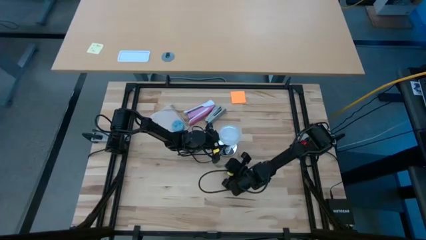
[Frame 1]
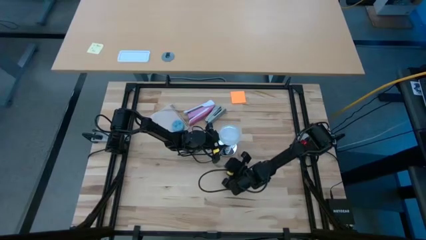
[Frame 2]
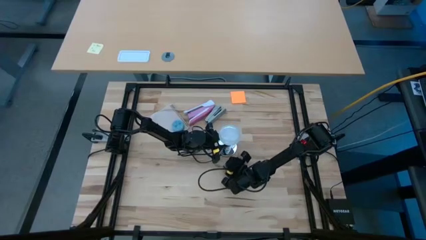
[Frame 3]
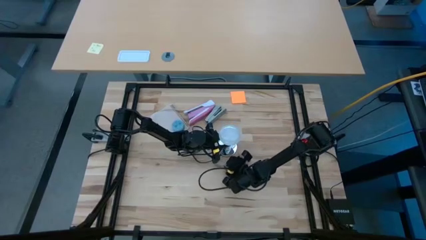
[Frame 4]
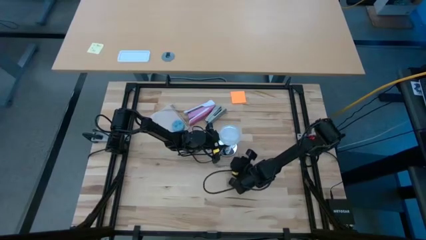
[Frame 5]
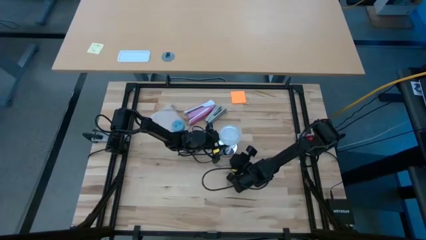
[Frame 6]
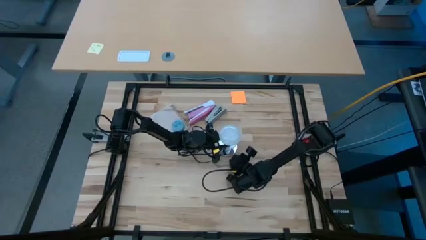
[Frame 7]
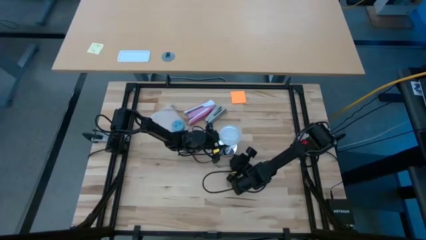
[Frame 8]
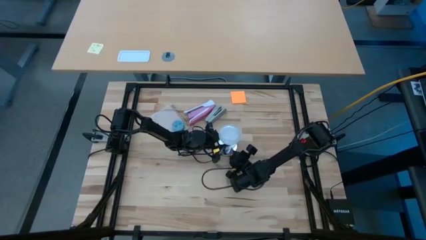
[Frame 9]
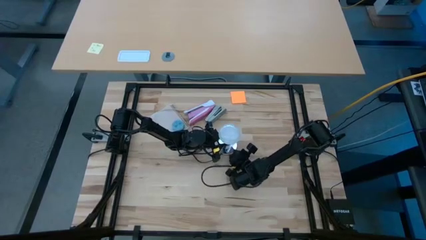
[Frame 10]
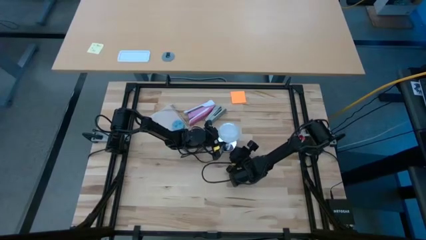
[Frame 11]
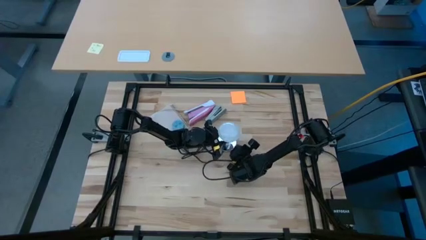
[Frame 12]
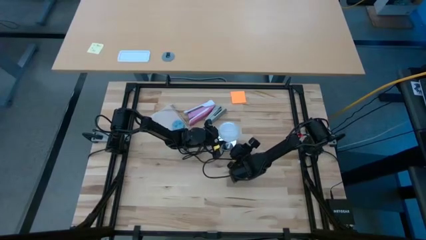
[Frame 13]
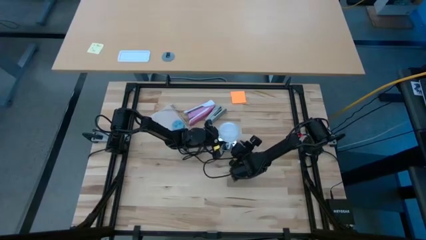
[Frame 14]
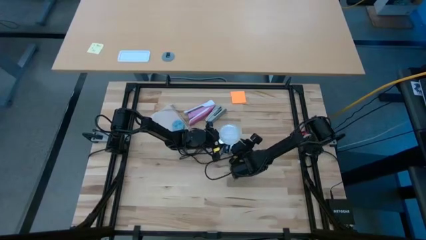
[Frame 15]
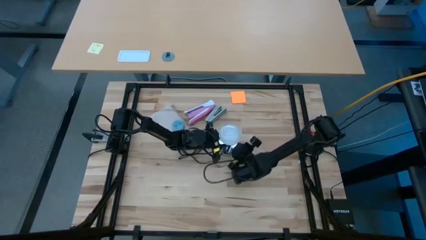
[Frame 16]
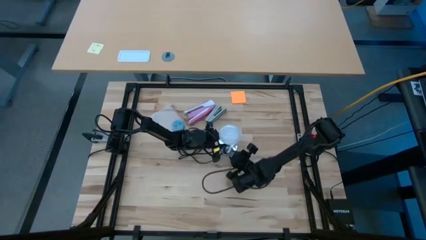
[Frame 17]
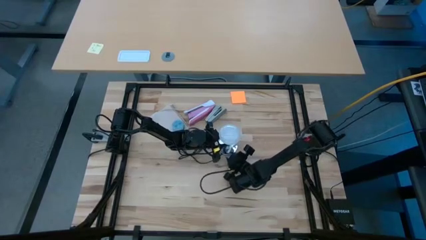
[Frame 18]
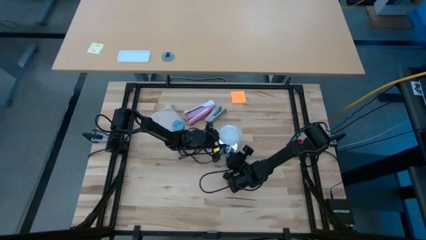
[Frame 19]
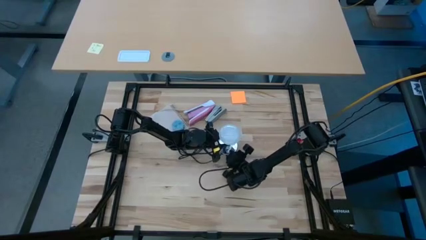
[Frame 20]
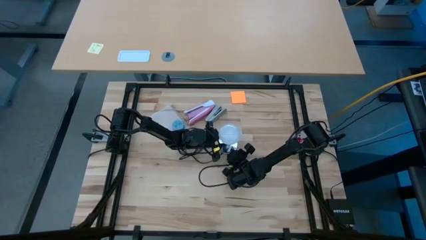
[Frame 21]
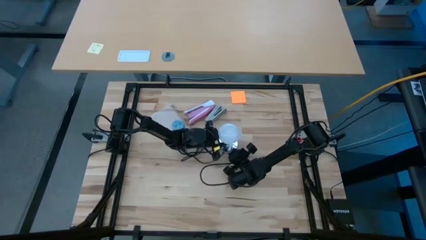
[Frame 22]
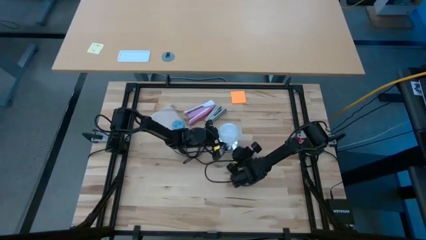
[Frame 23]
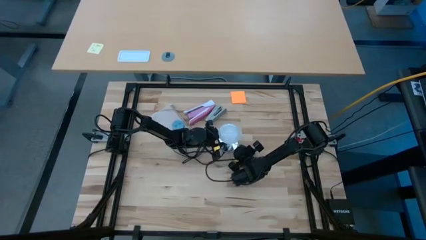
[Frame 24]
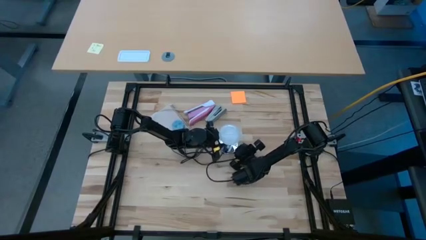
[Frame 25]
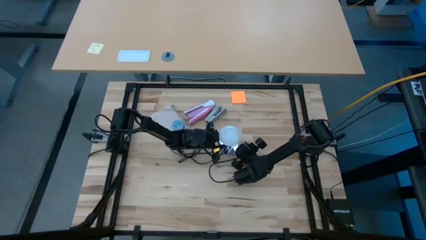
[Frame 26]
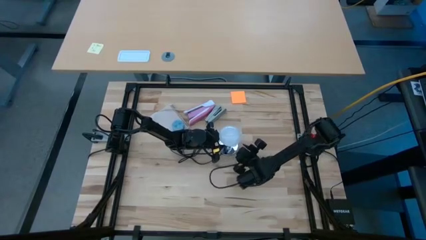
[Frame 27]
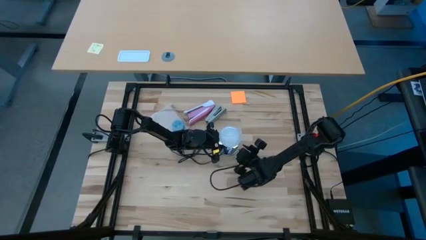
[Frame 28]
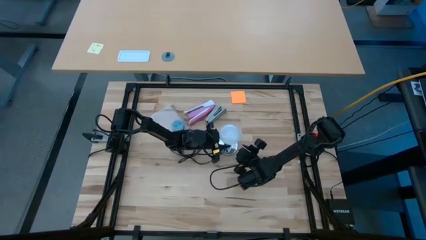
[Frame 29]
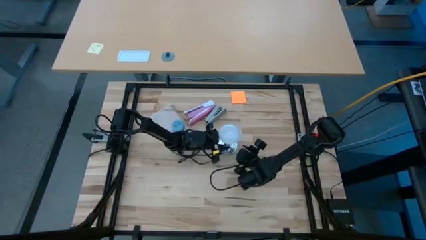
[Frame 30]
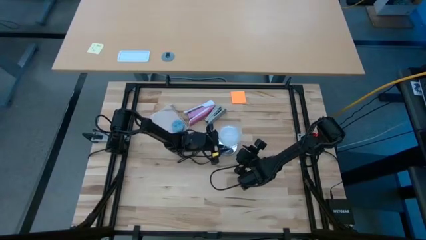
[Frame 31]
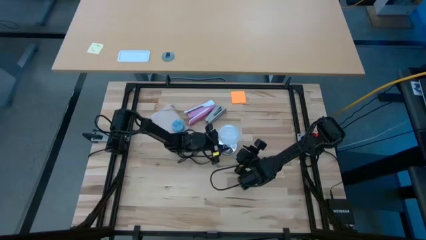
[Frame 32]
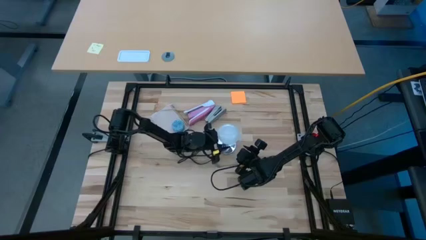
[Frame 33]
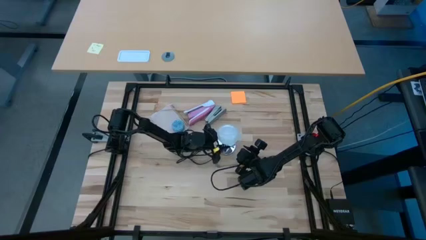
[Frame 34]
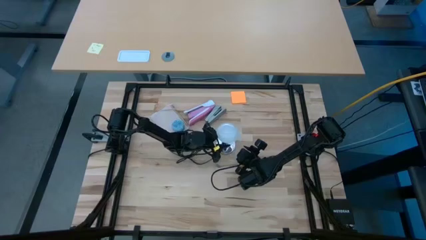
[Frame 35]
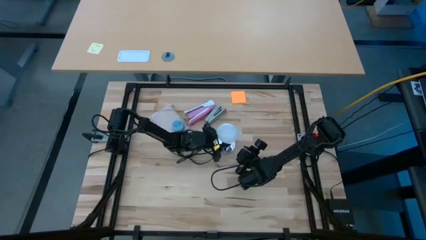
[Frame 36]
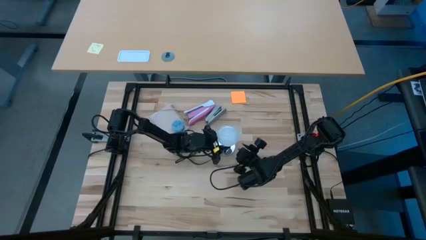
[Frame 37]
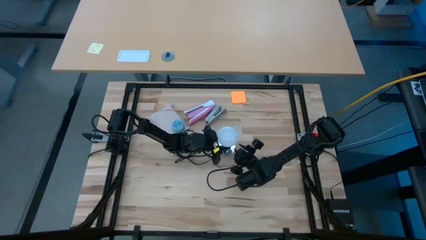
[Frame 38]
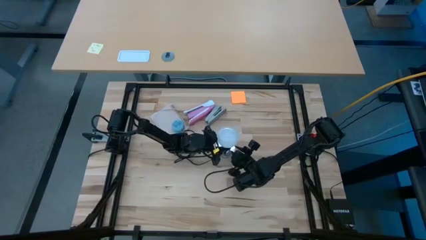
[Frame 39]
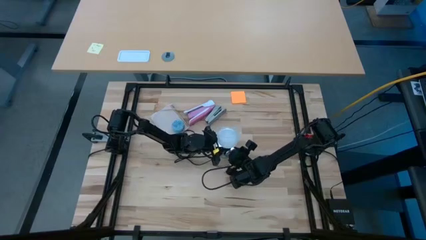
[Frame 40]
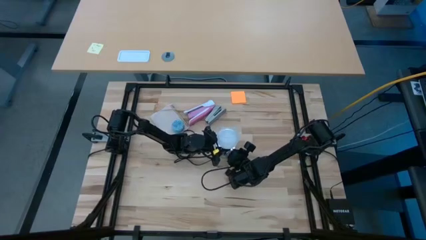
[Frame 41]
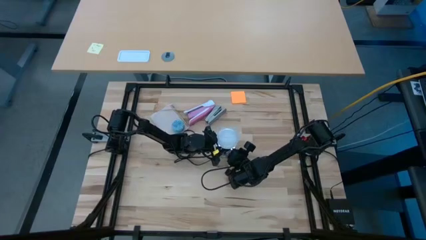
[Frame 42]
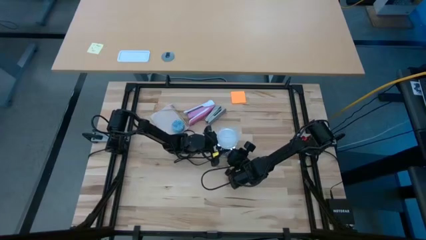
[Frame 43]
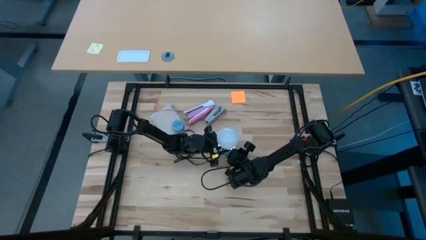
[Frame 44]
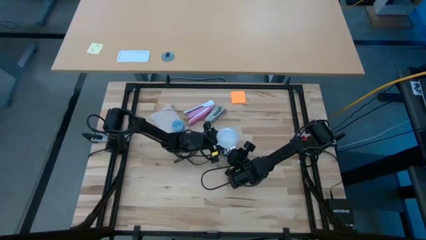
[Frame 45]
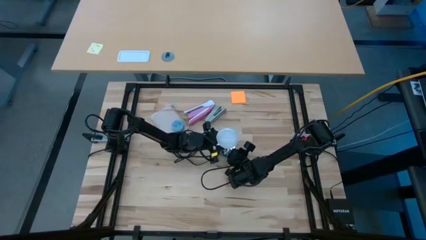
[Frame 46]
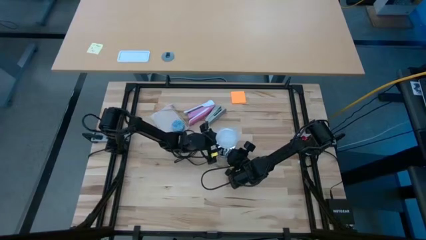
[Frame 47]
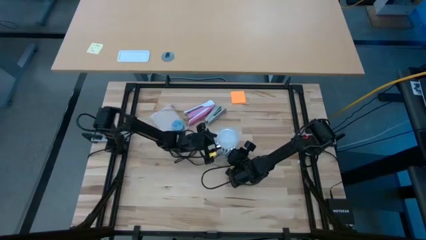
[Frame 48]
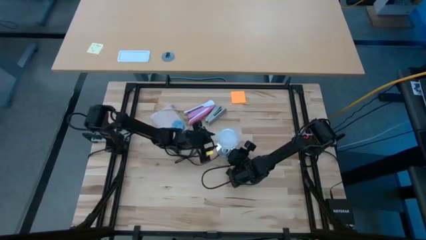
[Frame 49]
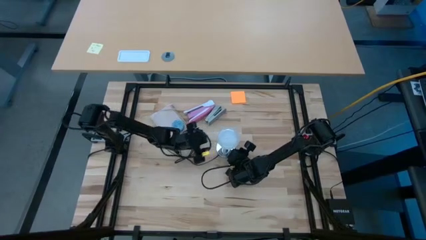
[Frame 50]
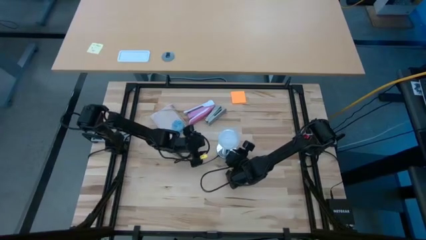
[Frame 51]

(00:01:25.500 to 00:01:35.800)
Task: Screw lightbulb
Insert the white lightbulb into the silver desk lamp

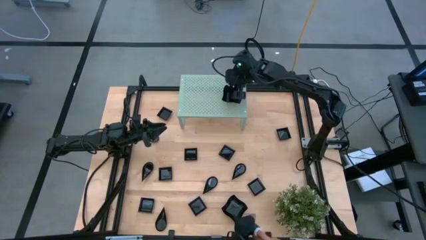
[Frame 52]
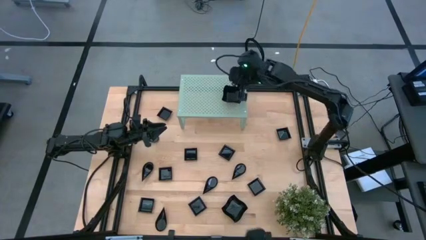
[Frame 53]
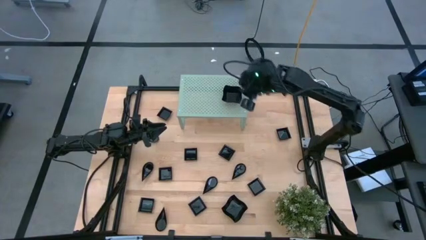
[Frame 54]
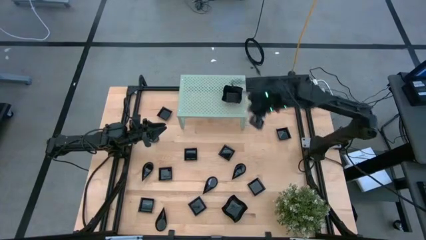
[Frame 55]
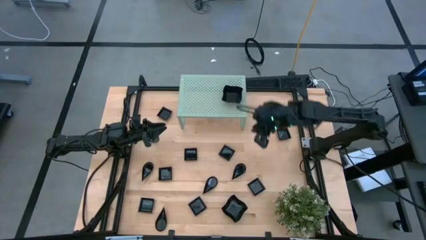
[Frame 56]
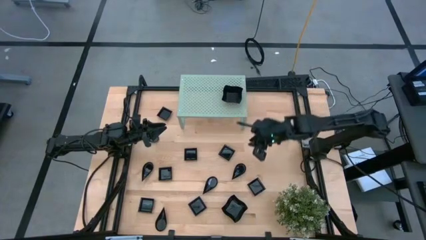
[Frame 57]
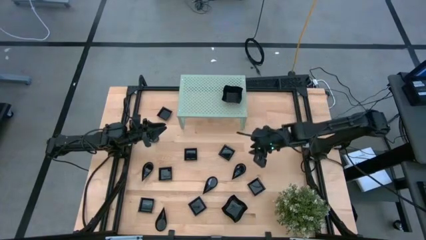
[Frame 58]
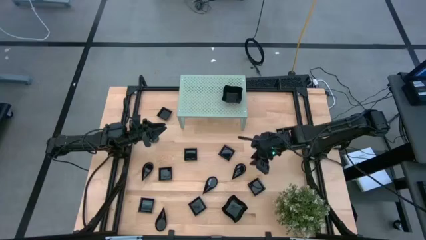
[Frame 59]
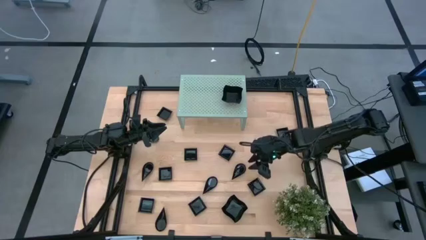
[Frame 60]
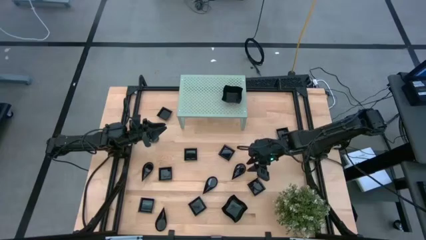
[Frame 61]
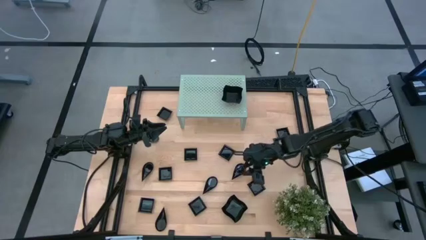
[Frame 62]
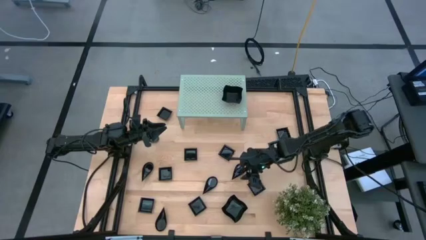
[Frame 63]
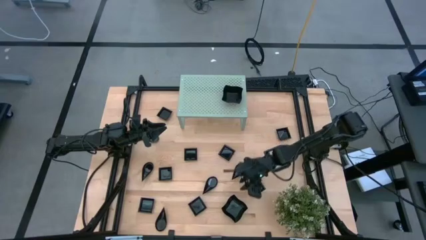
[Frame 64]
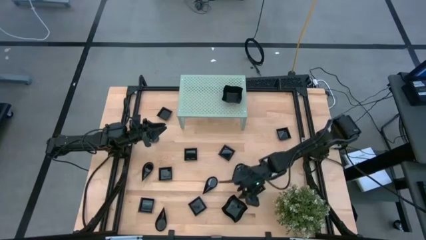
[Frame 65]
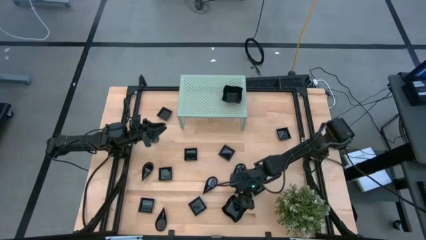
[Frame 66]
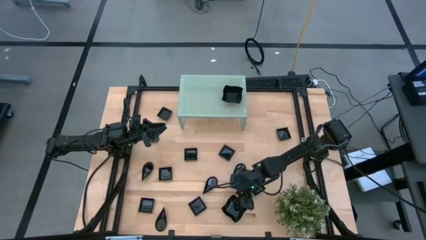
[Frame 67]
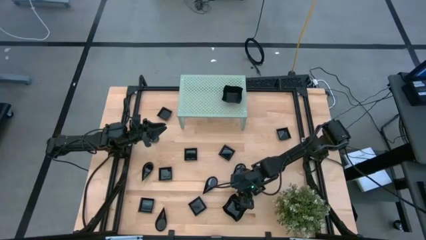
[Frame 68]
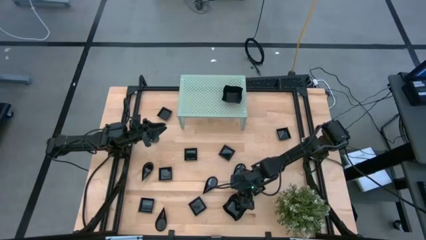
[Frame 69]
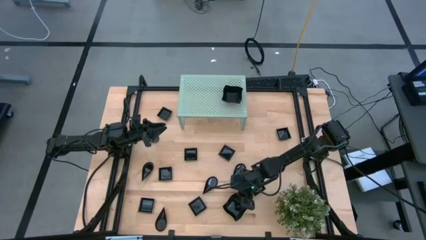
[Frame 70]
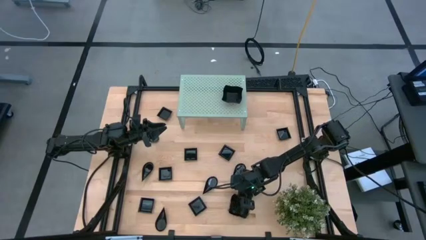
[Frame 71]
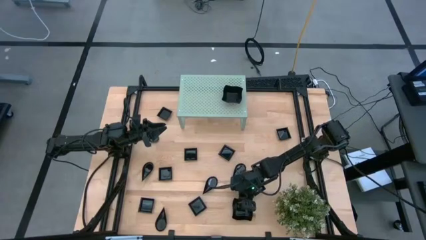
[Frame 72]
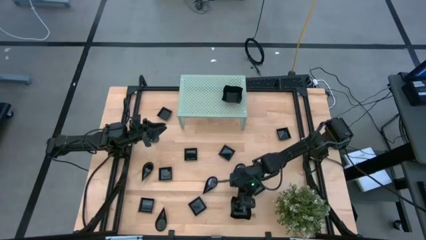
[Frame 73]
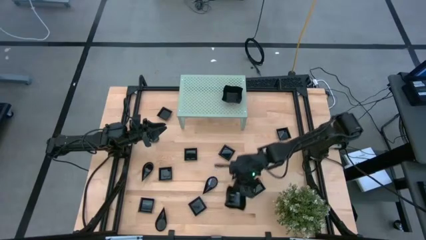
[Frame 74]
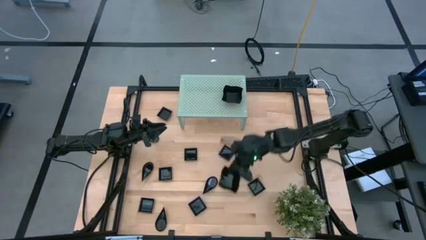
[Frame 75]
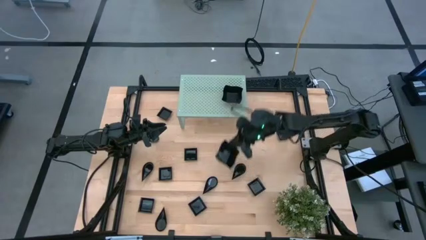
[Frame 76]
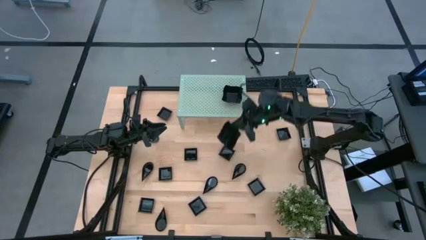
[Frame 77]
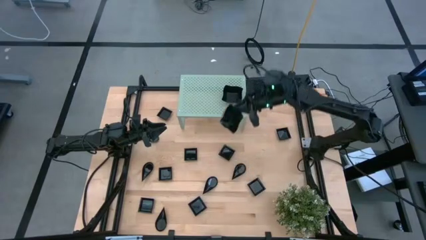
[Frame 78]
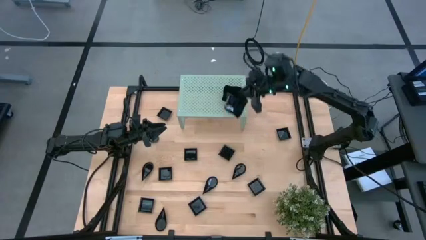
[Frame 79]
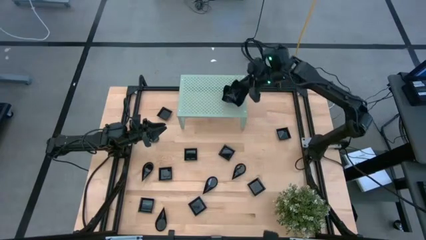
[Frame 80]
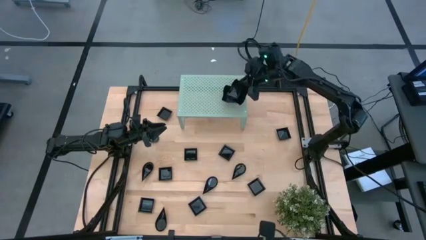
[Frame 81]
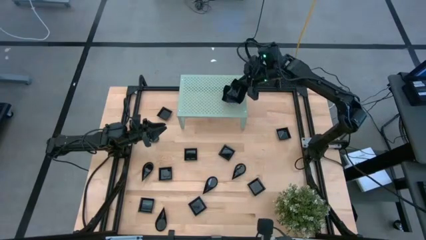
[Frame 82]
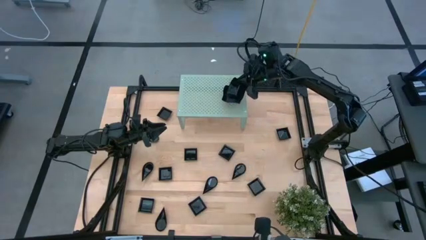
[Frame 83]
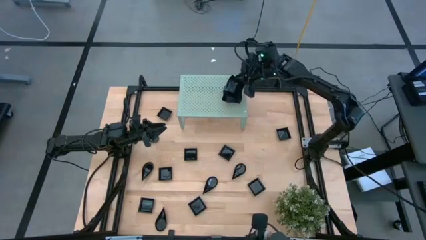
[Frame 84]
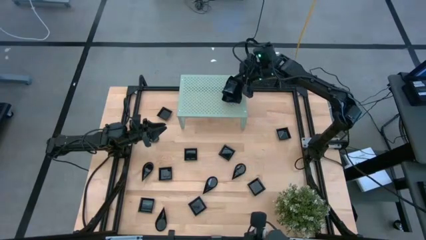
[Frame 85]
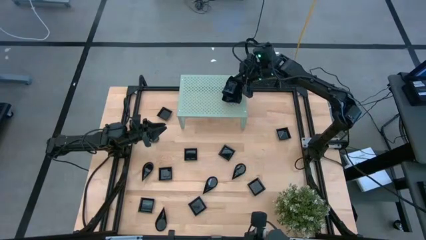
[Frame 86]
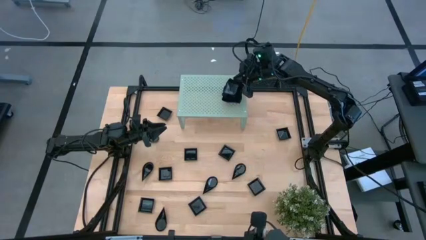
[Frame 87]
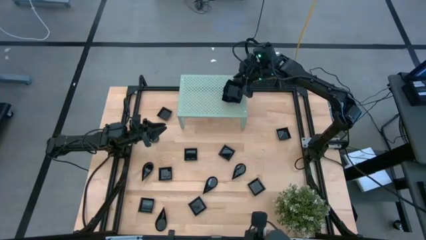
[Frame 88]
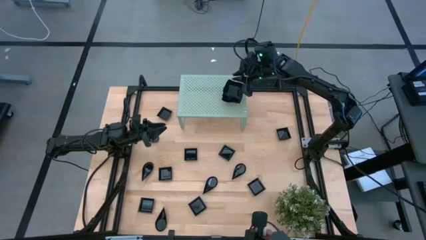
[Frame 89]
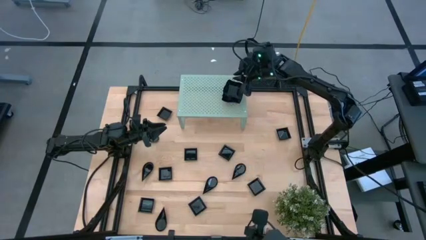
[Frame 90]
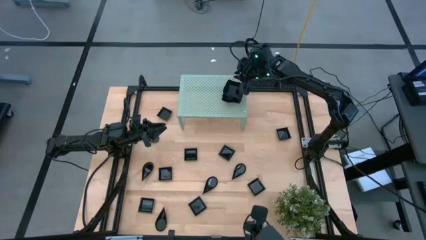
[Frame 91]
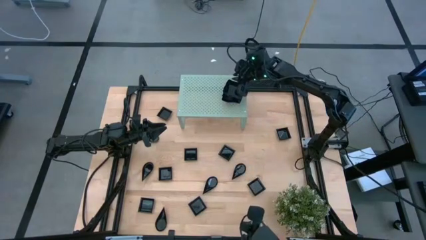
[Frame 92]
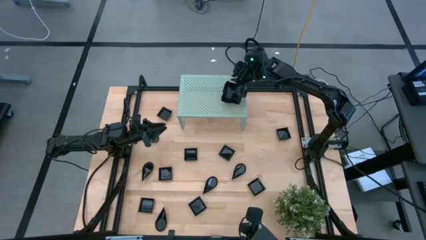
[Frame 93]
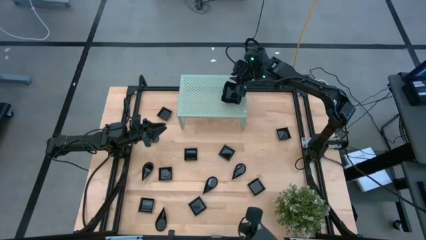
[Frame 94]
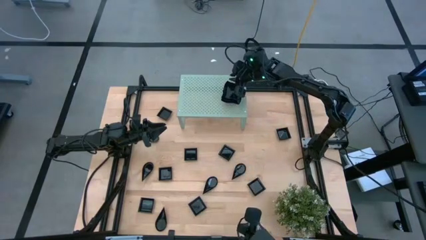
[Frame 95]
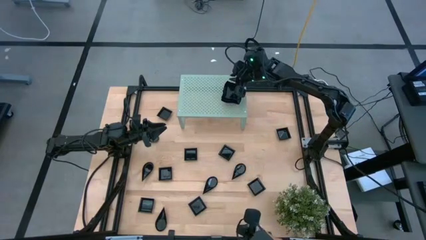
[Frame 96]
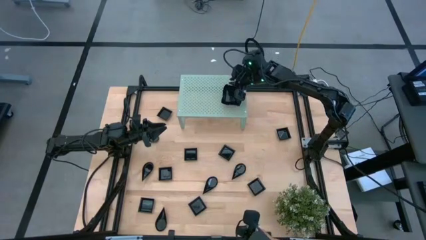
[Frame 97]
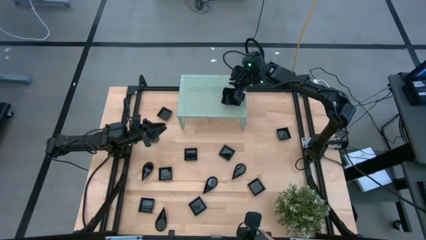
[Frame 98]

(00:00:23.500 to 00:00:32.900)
Task: Pick & Place Mini shaped plates
Stack the black distorted square plate on top of the other black distorted square plate on the shelf
